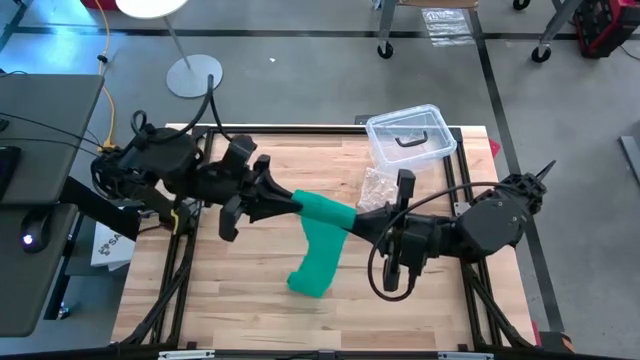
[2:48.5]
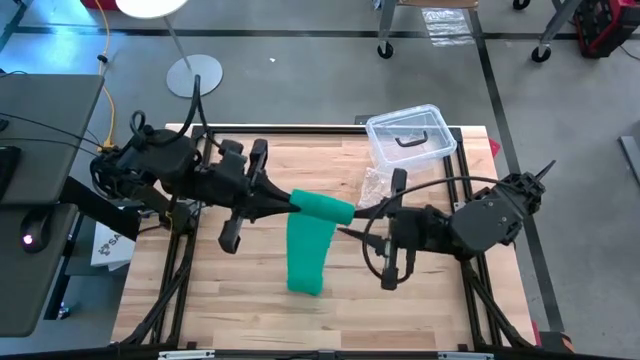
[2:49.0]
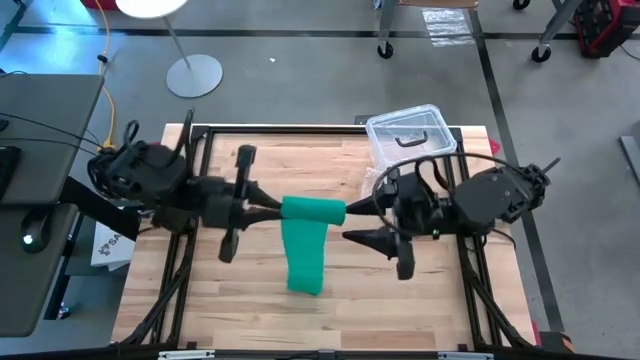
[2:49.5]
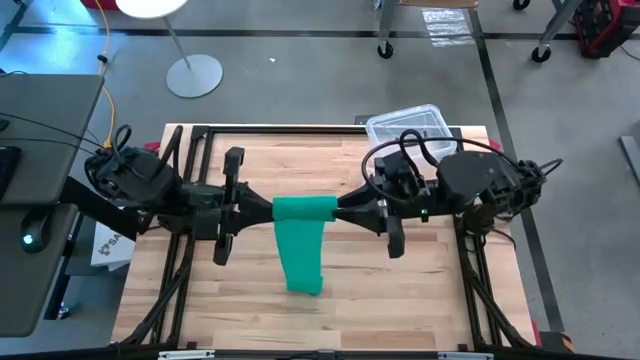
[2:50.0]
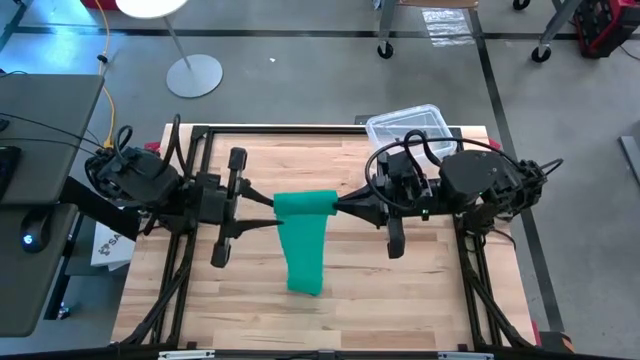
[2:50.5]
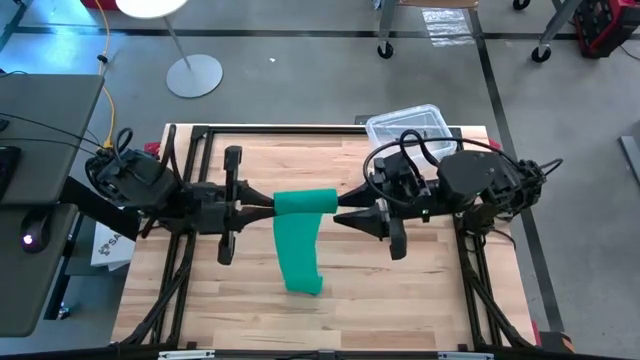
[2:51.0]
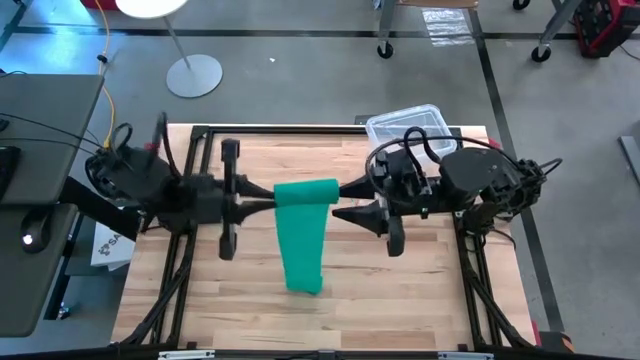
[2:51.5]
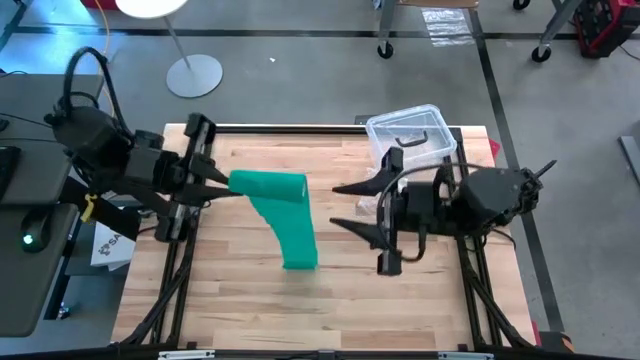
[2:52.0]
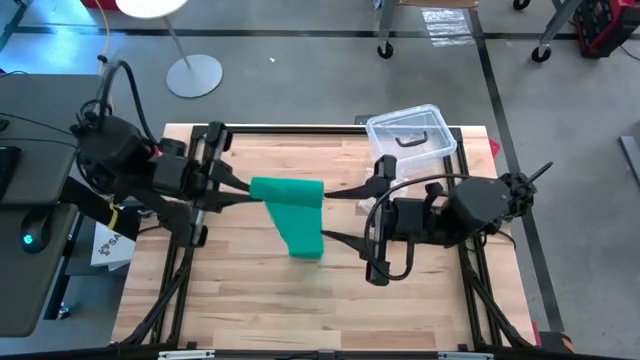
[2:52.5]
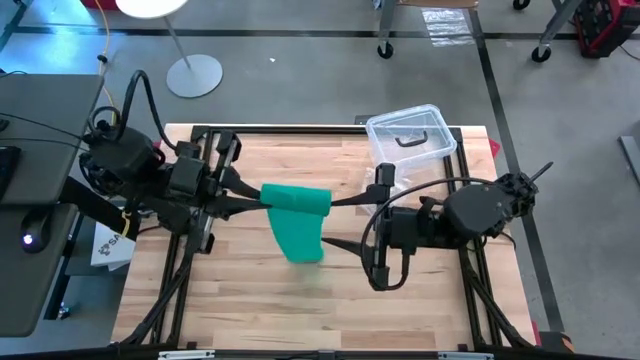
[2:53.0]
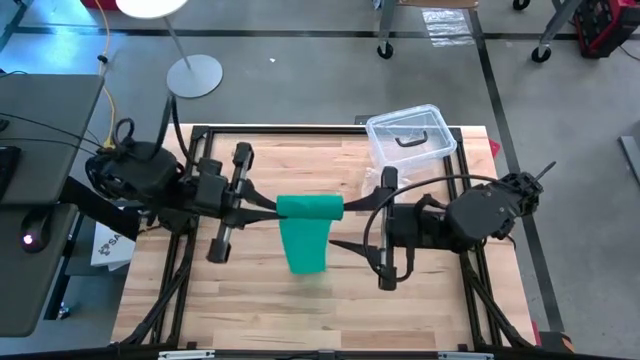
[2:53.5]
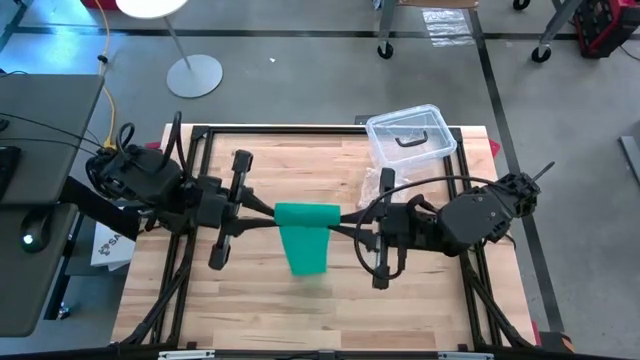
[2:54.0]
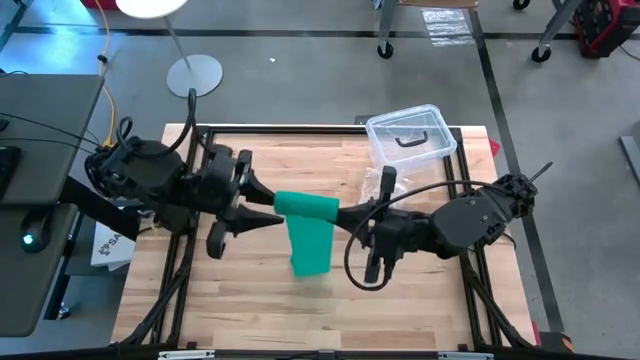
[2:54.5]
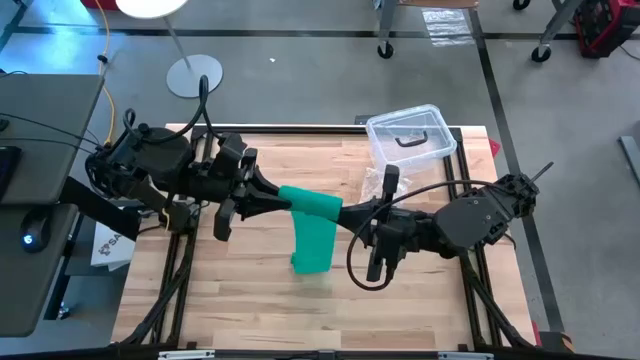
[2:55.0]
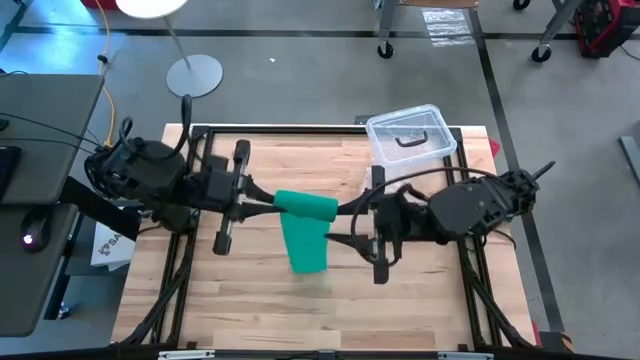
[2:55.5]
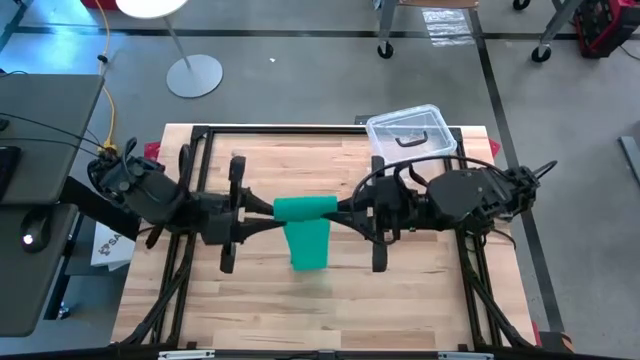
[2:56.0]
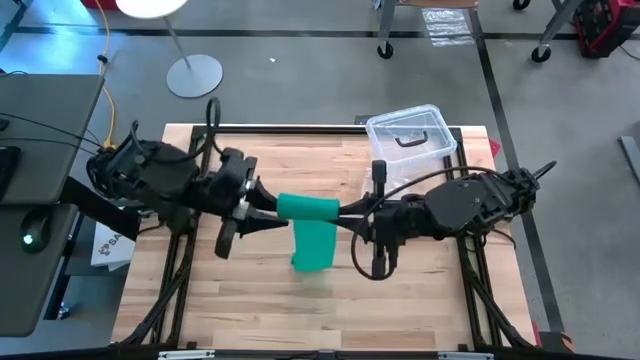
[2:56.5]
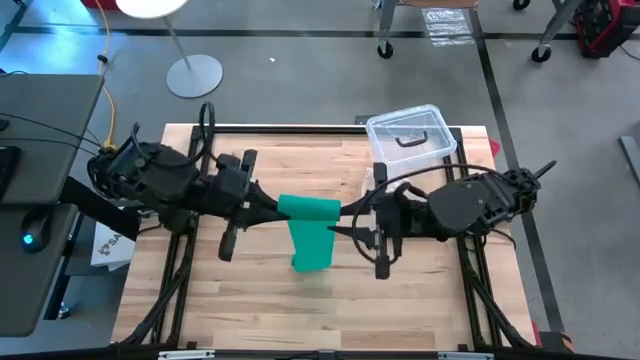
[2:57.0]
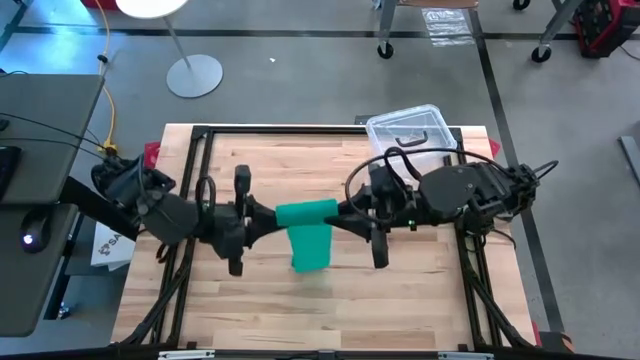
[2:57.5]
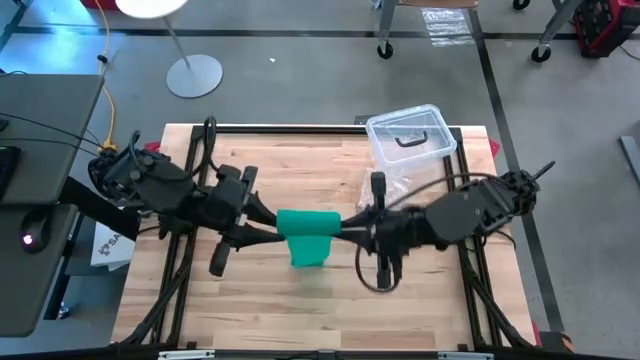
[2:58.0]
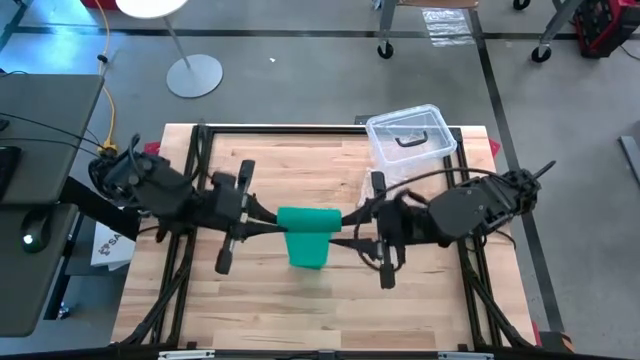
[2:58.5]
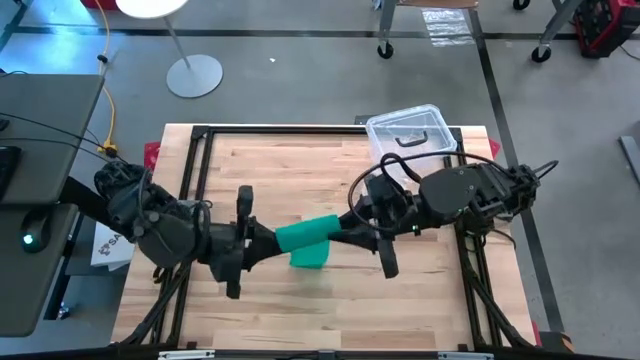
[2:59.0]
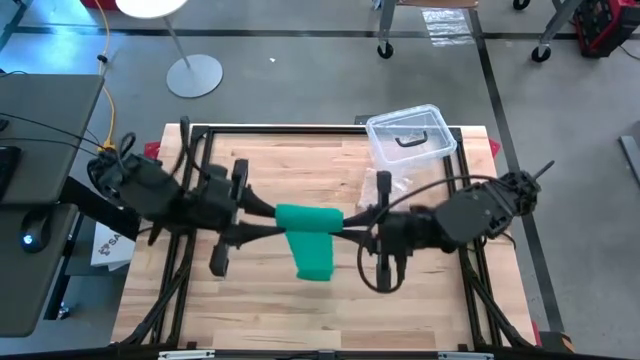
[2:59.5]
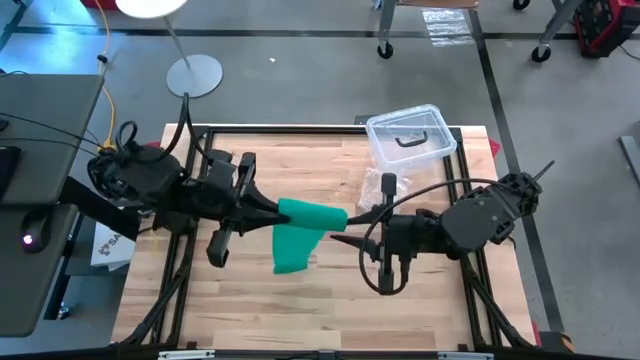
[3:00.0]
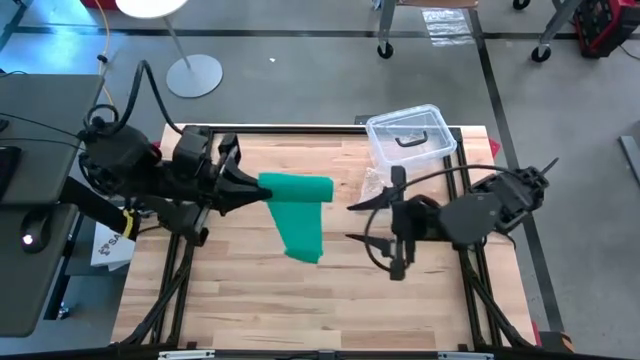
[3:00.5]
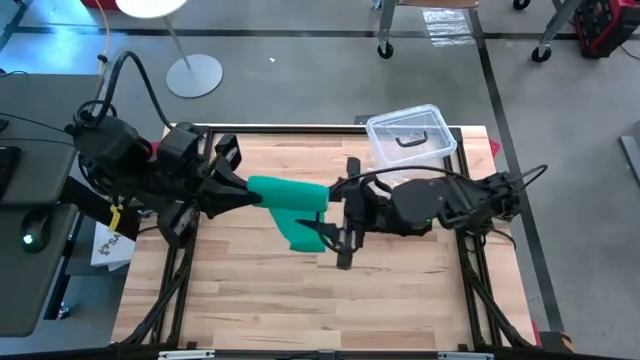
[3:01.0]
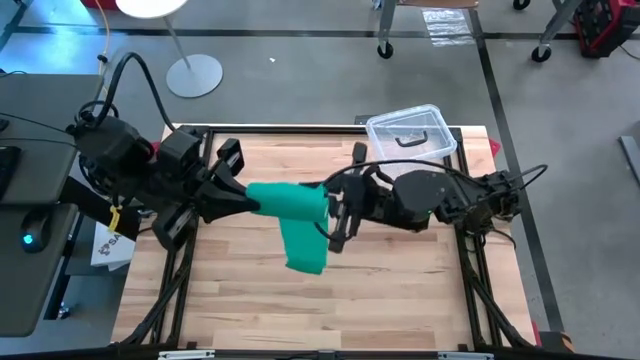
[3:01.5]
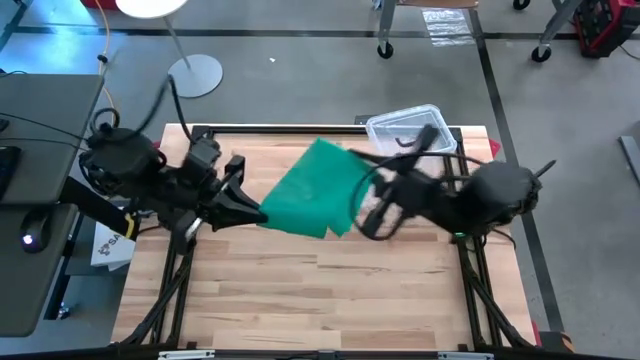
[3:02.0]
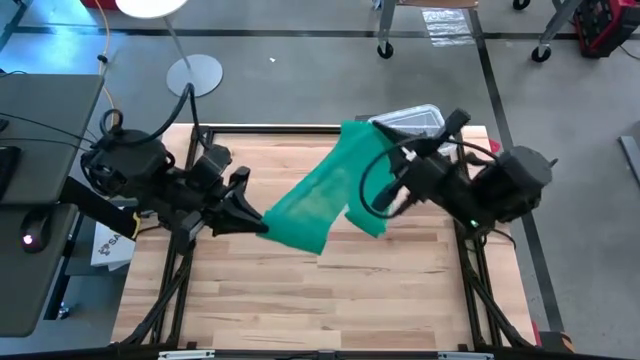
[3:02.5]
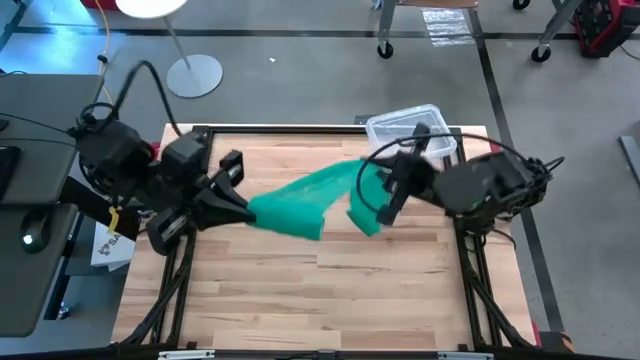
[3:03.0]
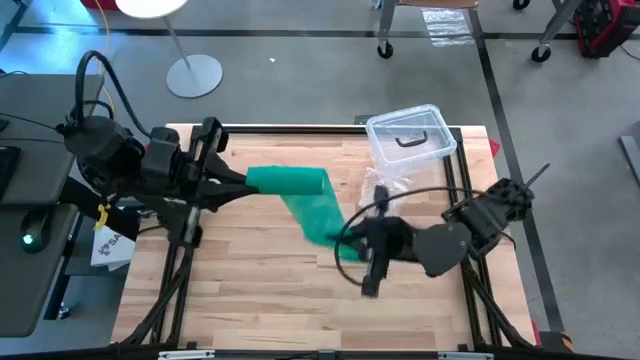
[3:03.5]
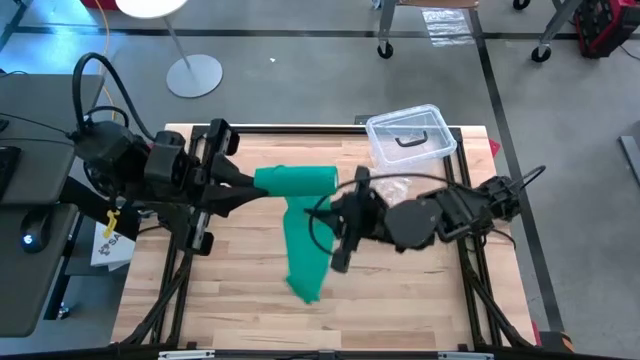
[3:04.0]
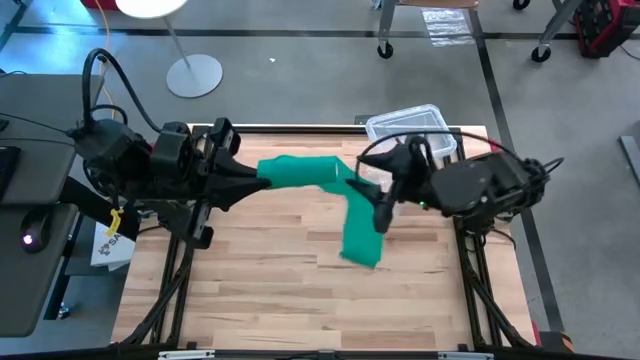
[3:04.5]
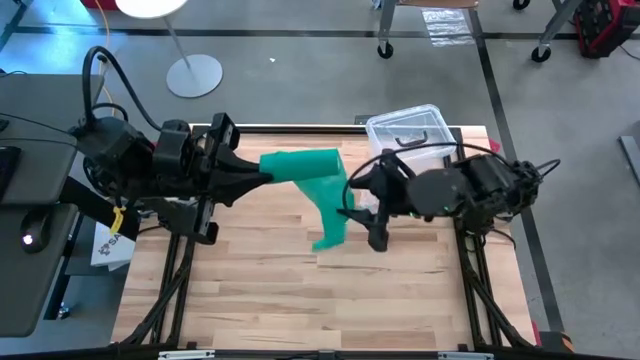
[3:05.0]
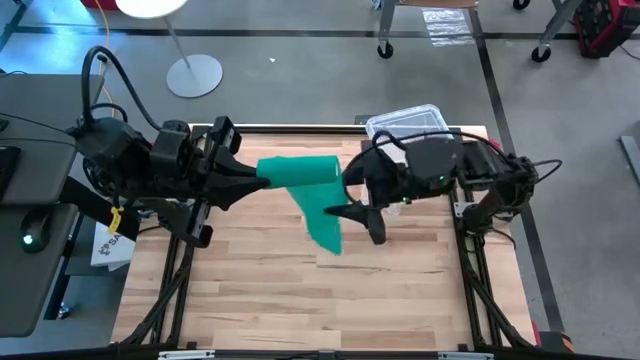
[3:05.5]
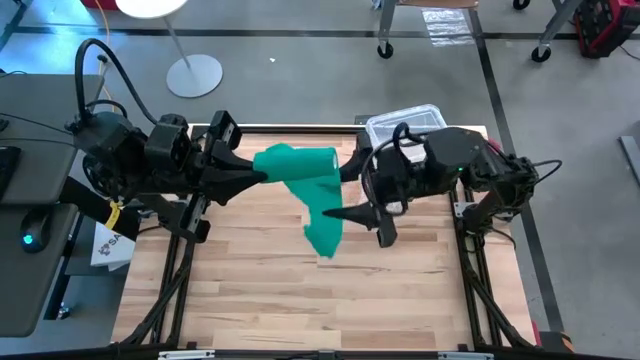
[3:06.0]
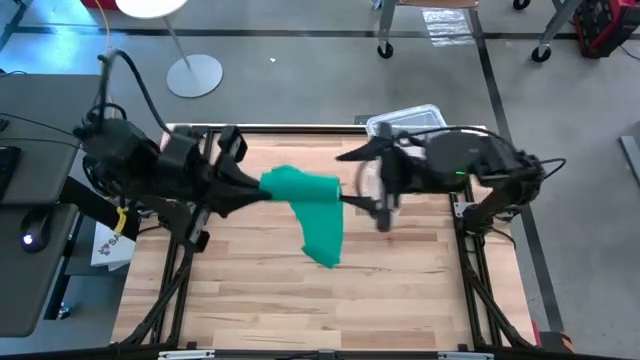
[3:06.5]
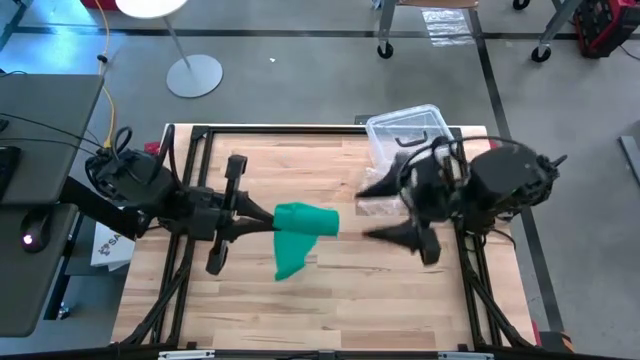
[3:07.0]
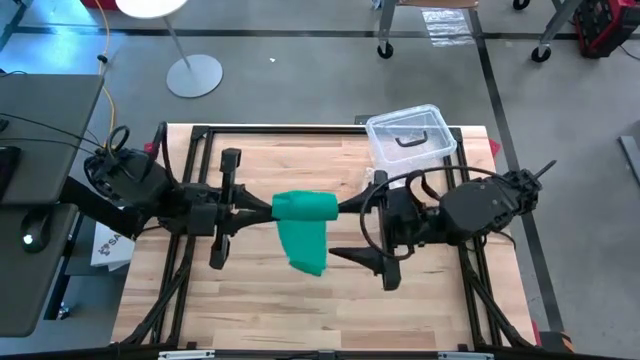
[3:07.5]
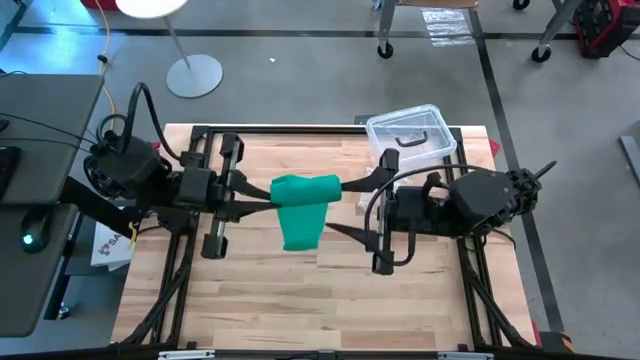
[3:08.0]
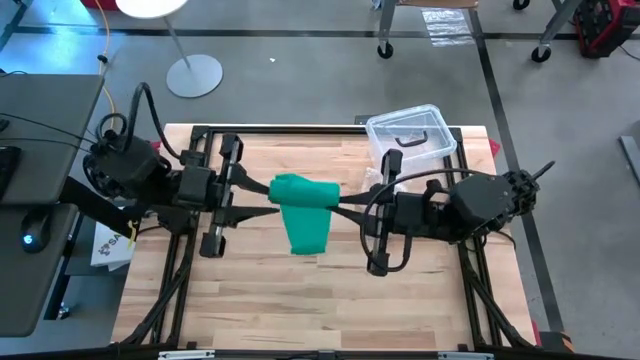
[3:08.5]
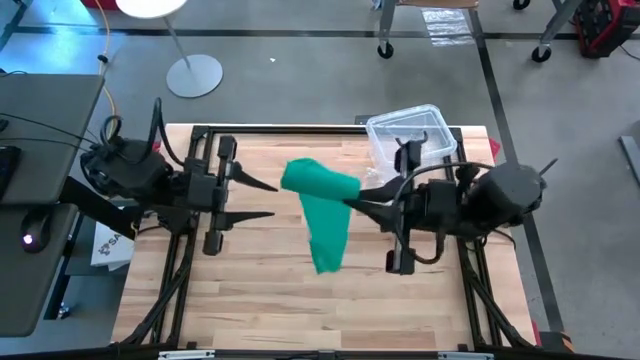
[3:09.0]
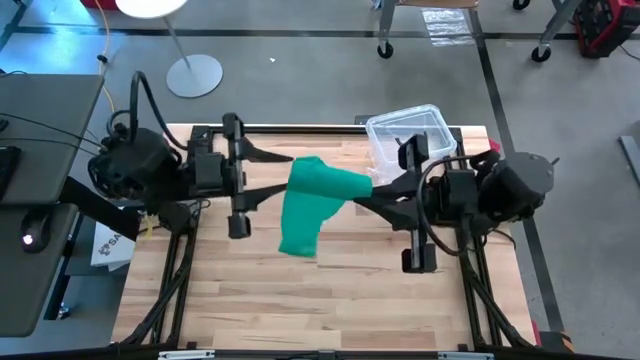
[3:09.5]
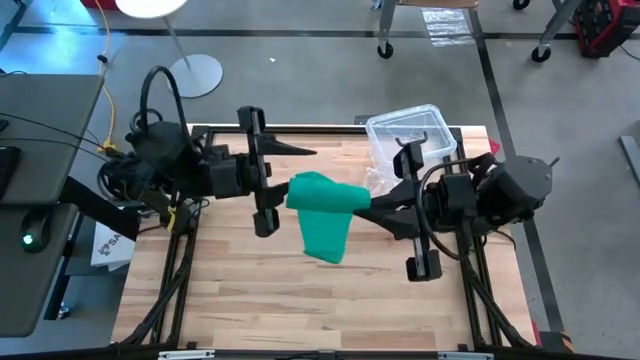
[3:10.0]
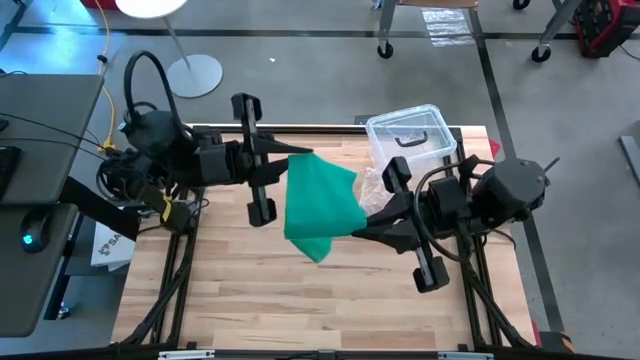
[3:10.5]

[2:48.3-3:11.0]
Task: Roll bandage
Roll the green bandage
